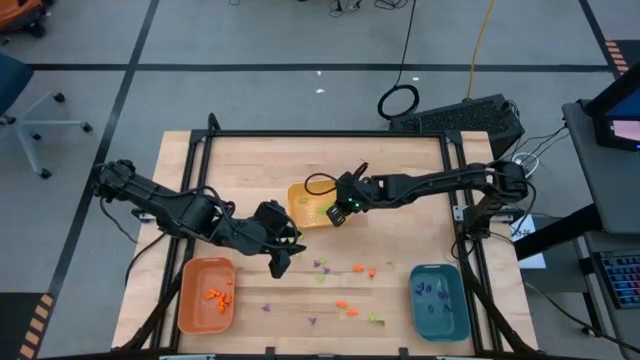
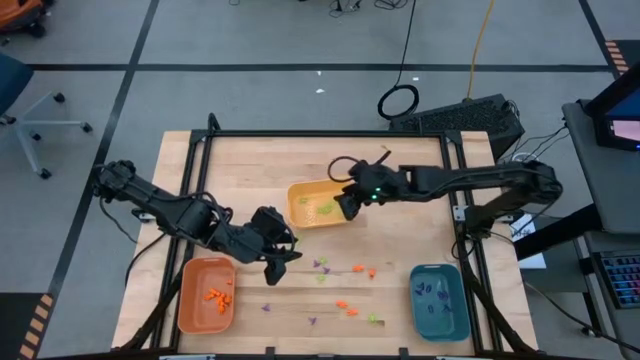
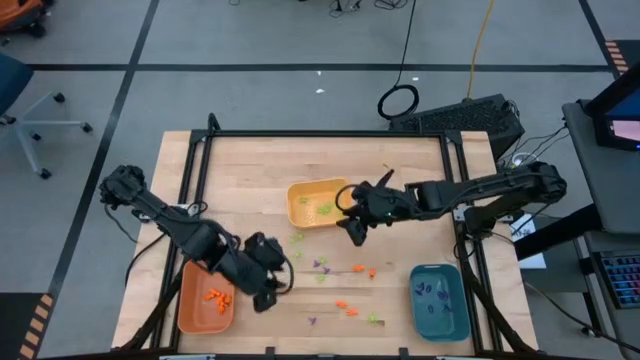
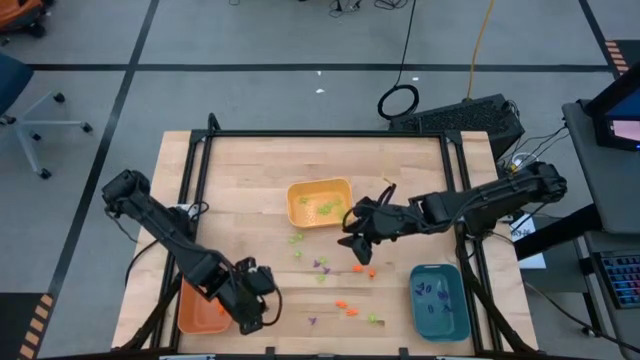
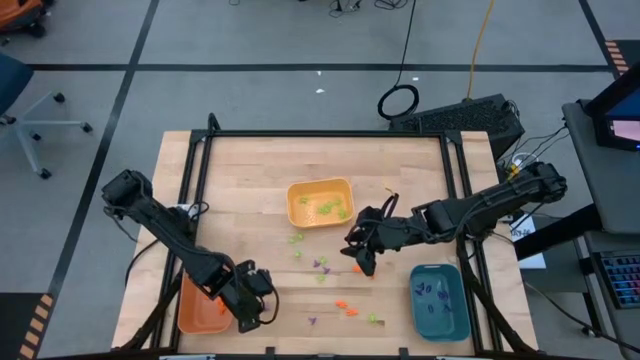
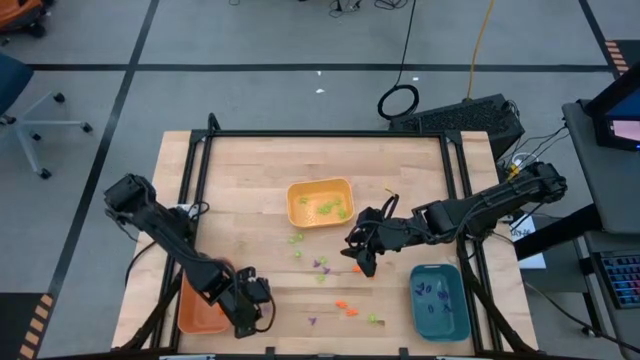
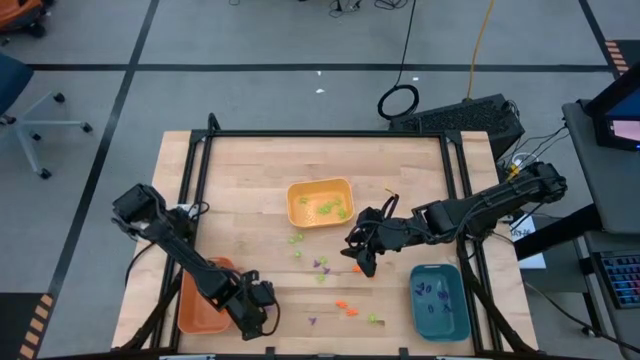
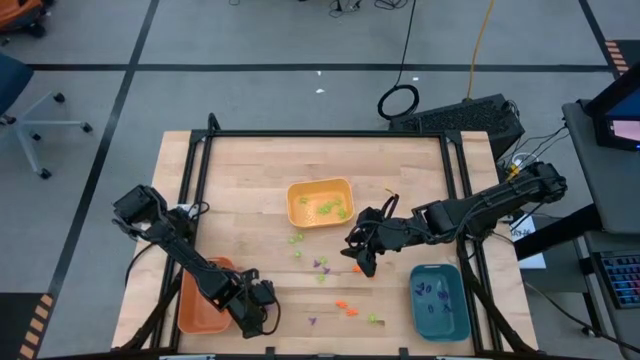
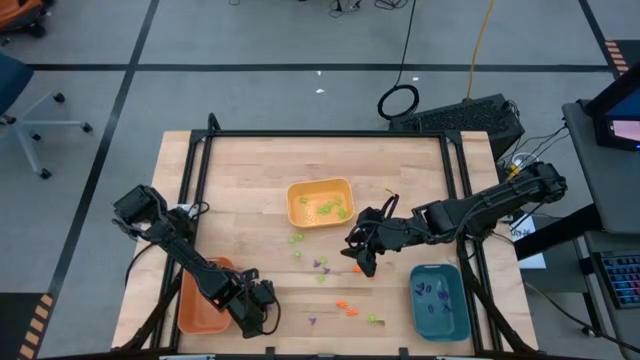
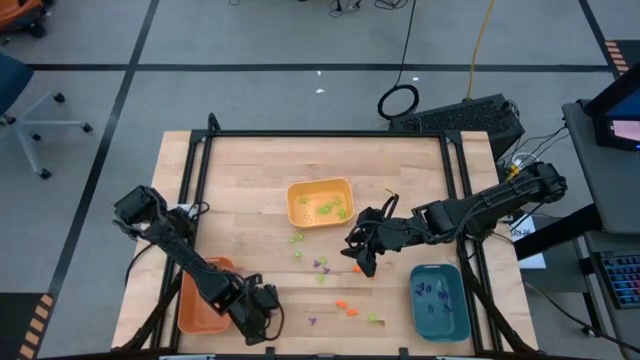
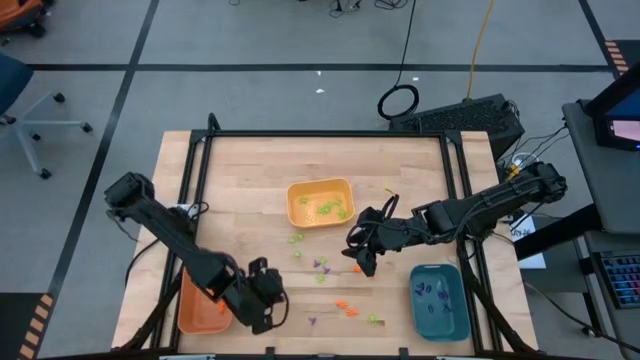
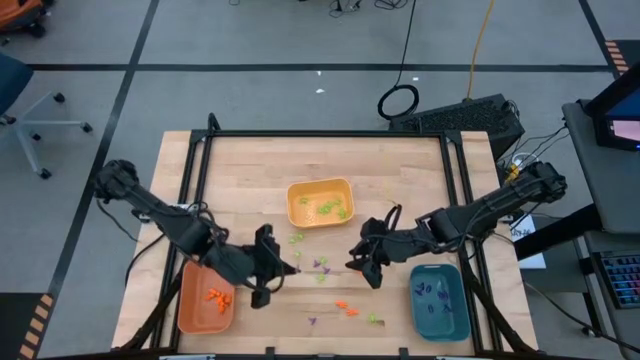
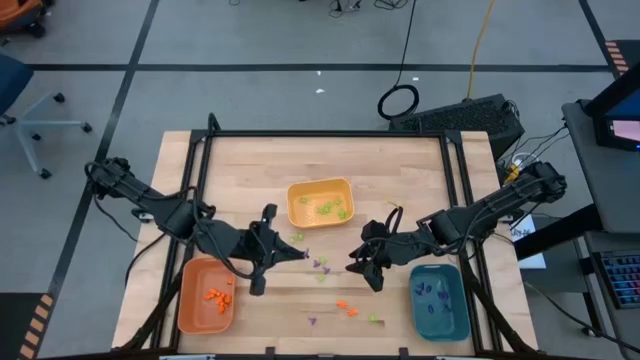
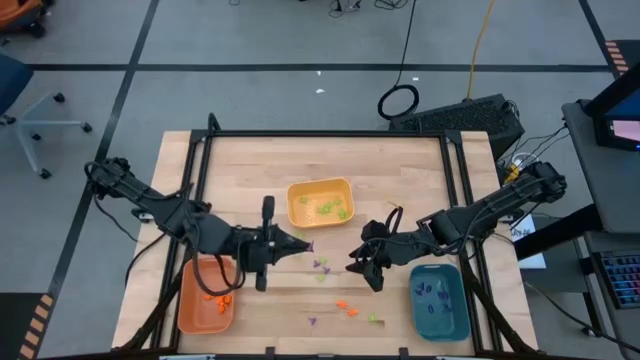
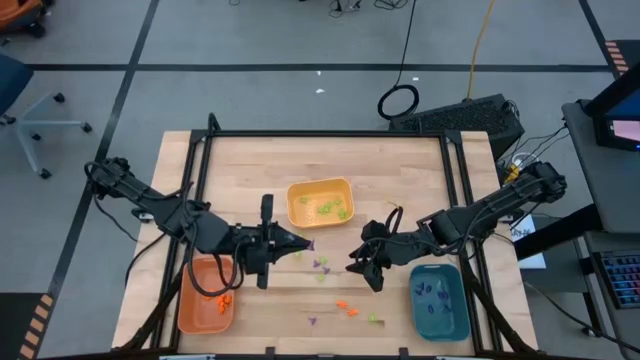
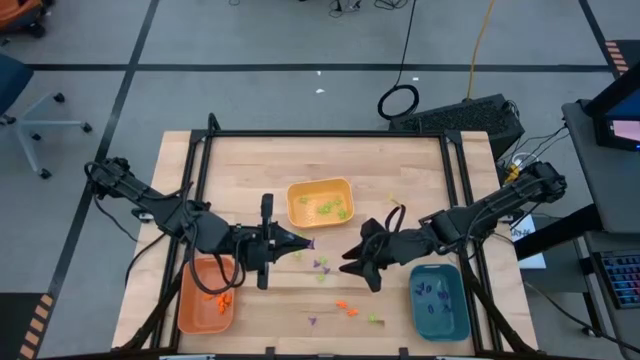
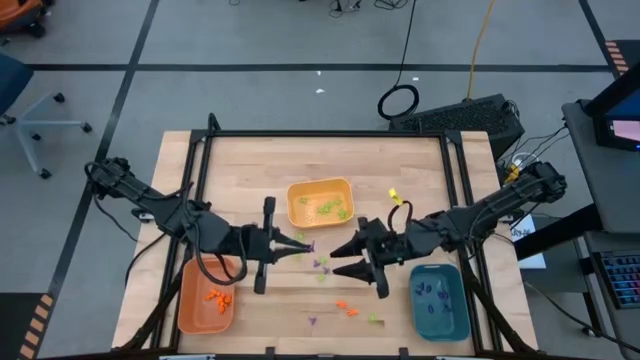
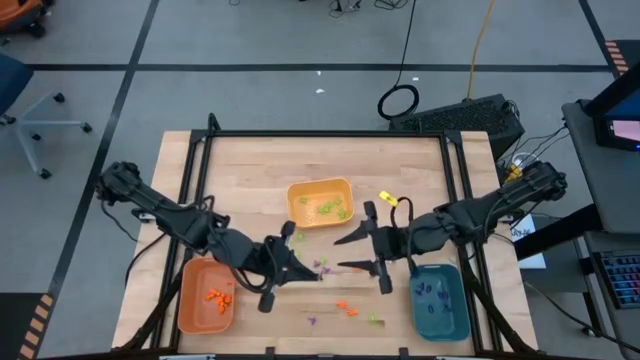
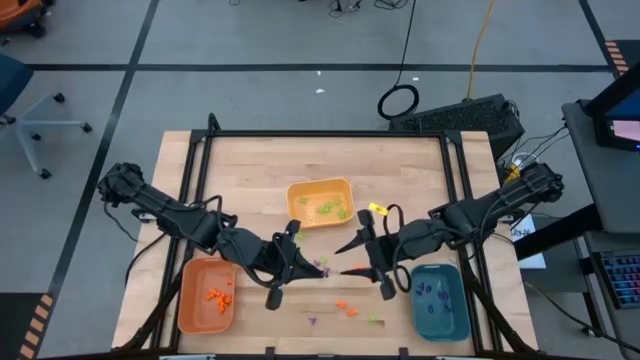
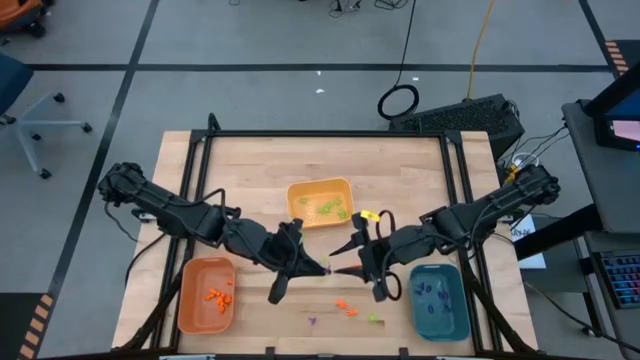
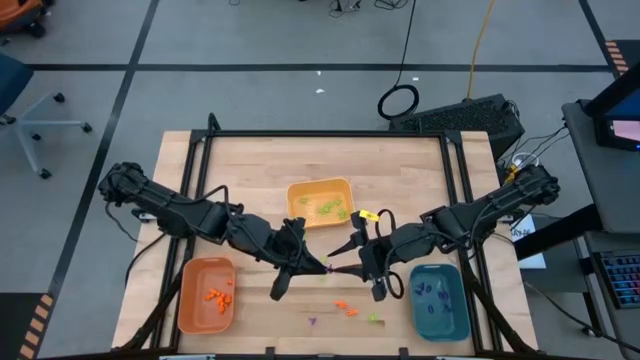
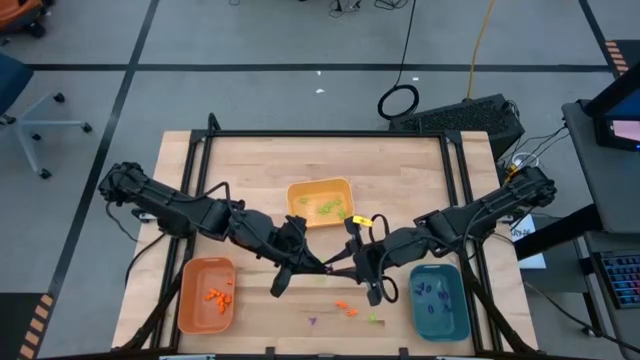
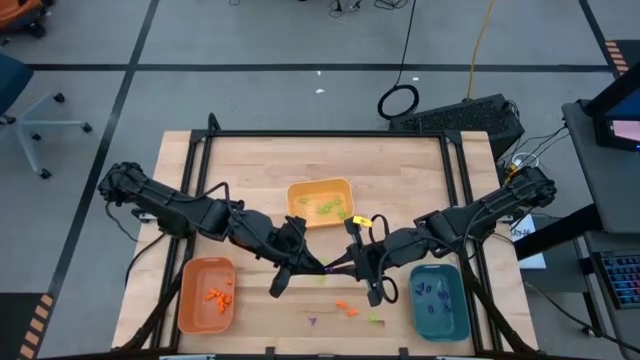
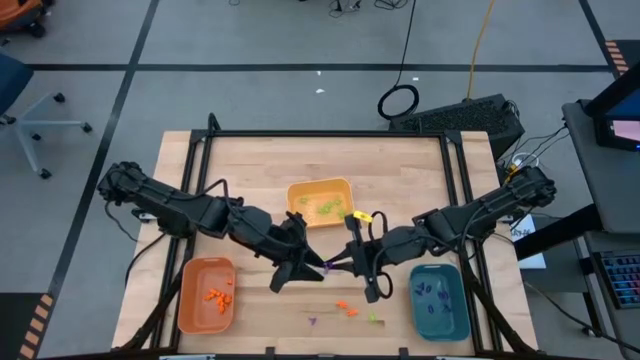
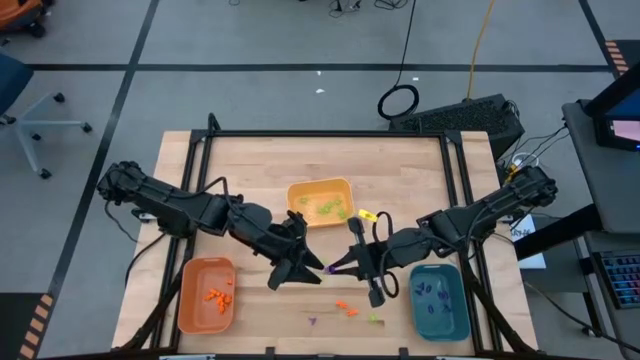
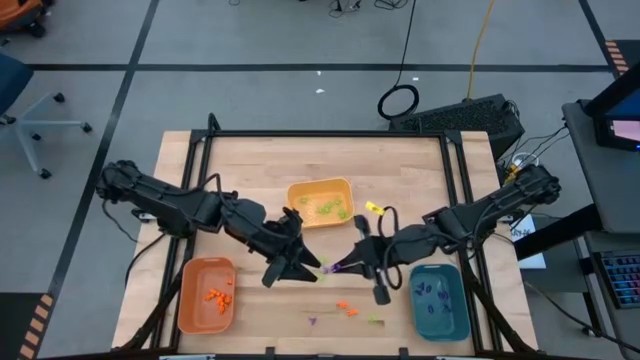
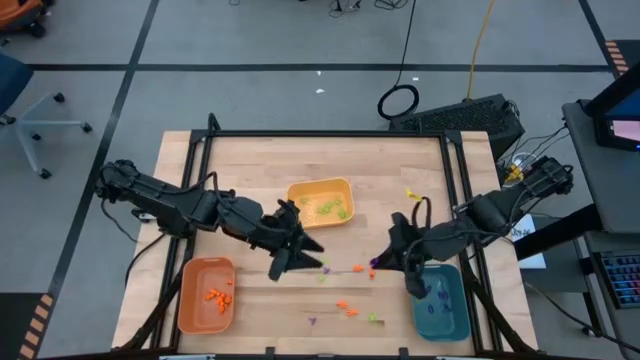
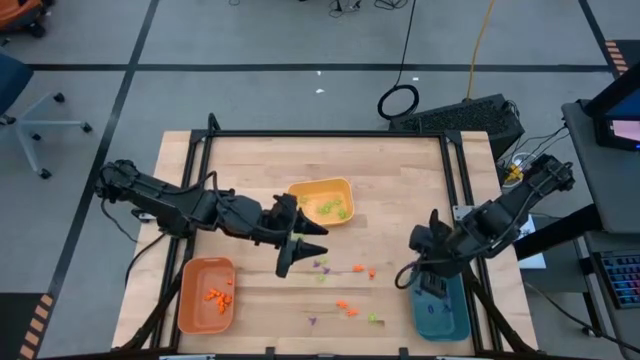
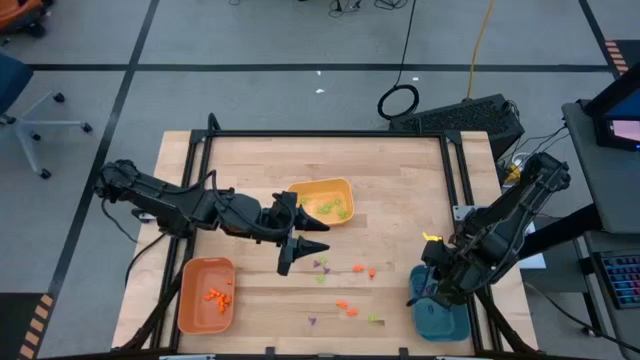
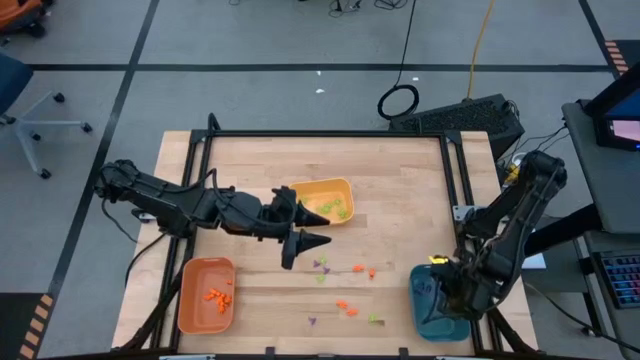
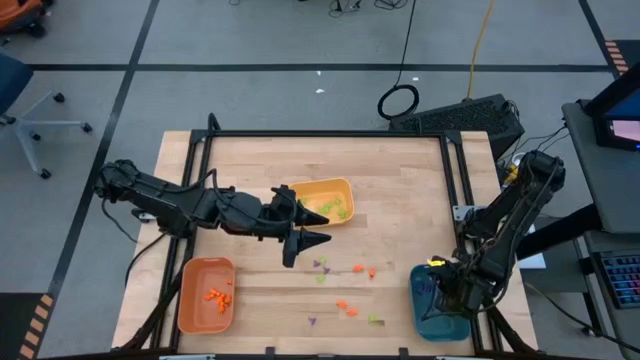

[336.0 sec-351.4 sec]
Task: Sort Halloween decoration
Put the violet witch hat toy into the blue bin

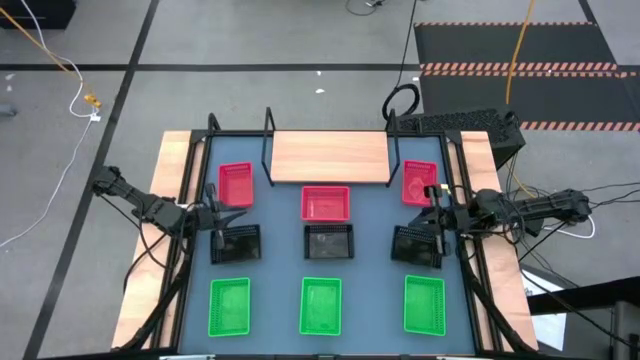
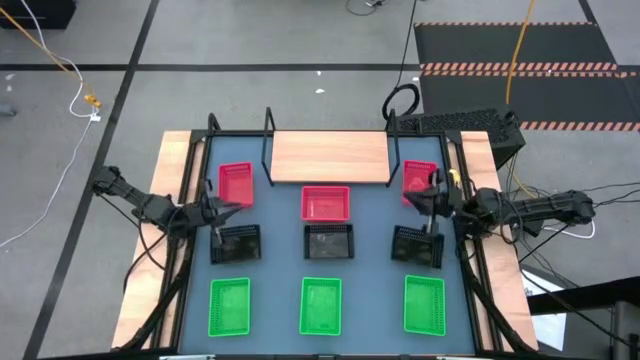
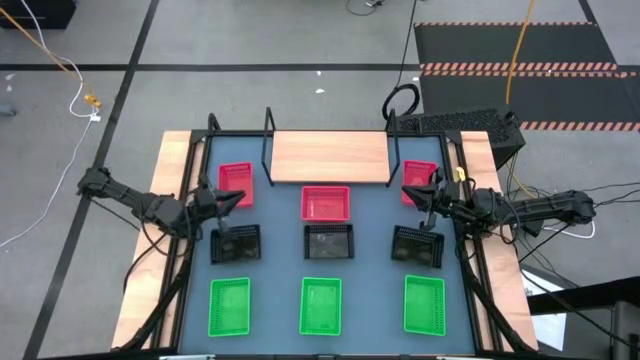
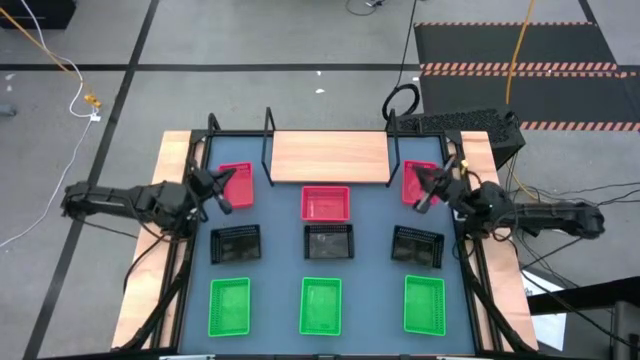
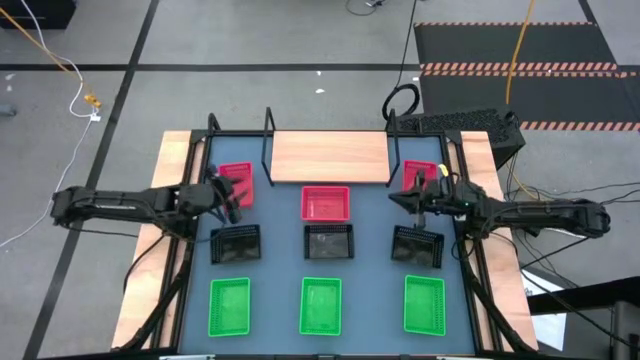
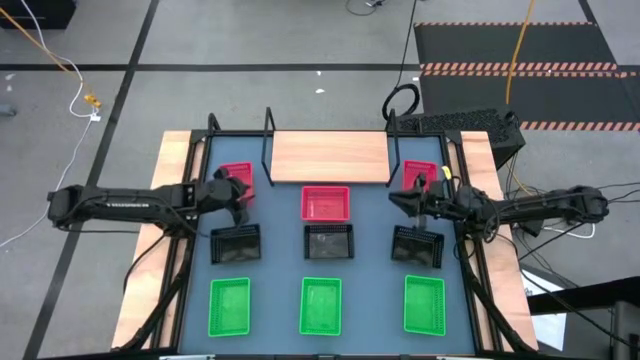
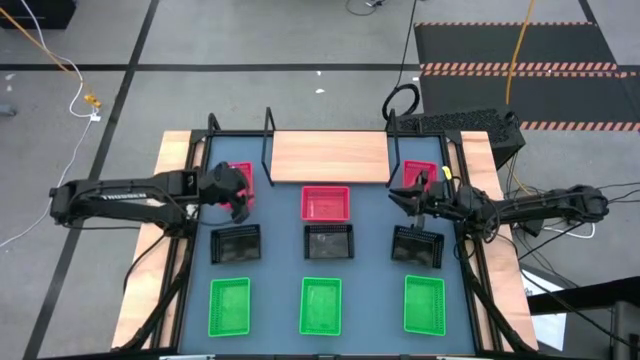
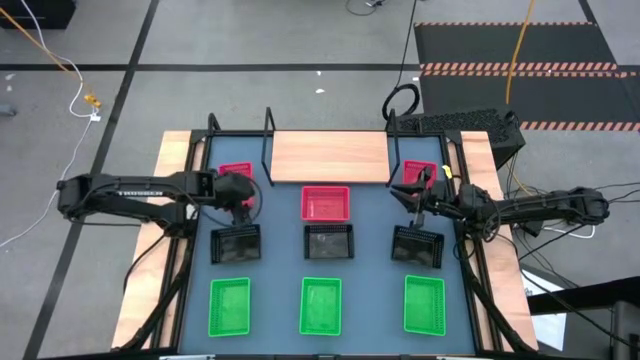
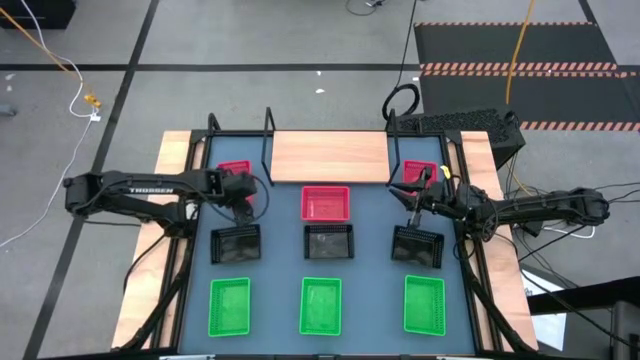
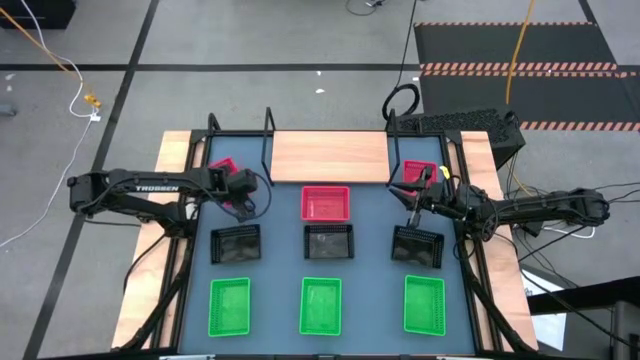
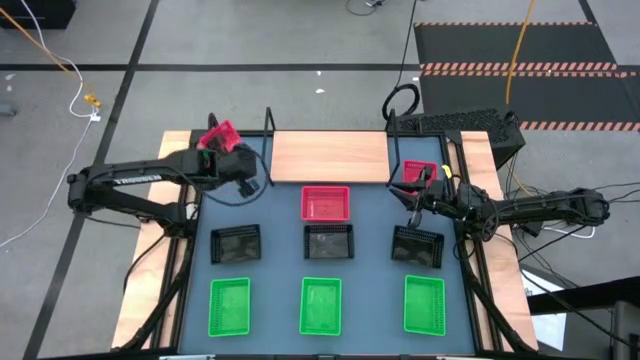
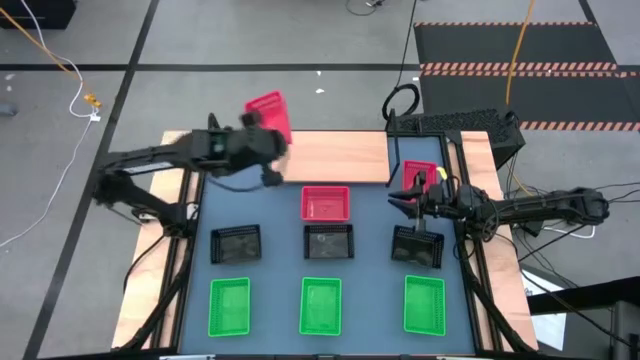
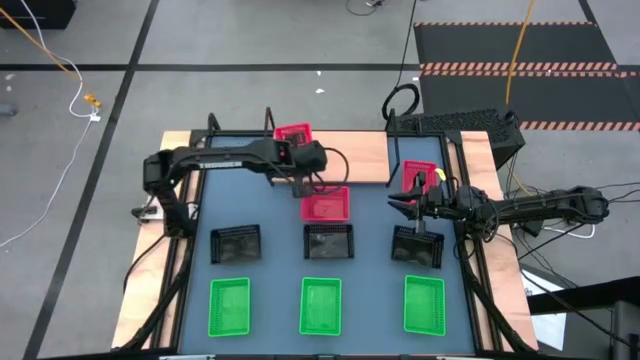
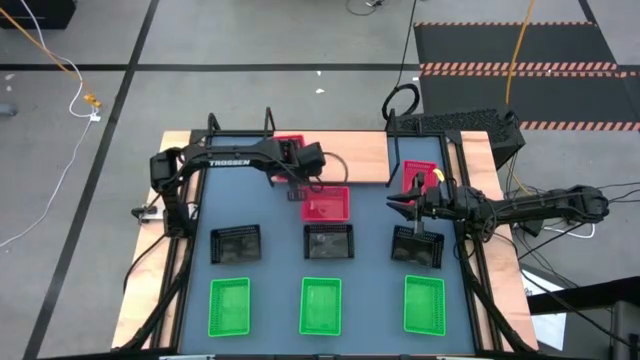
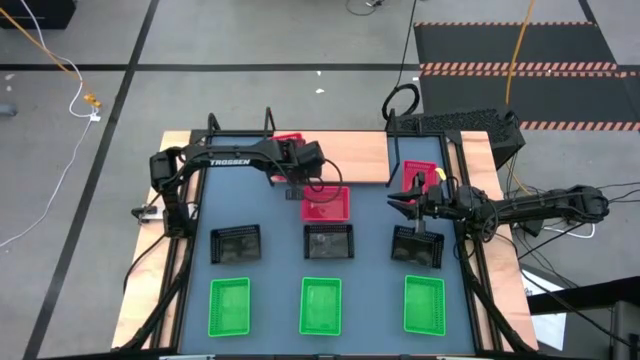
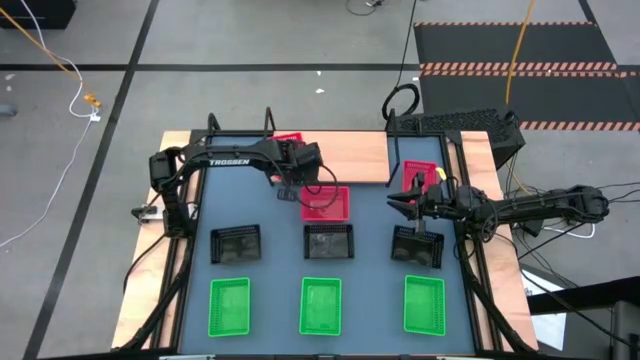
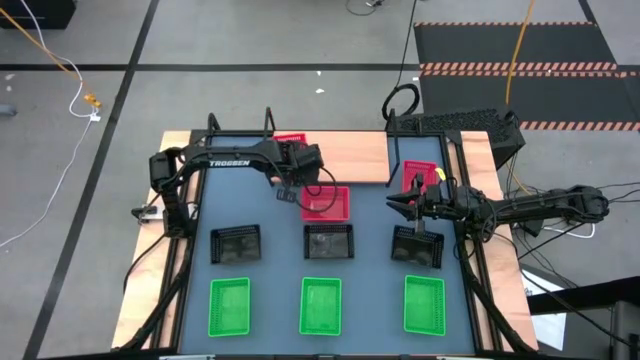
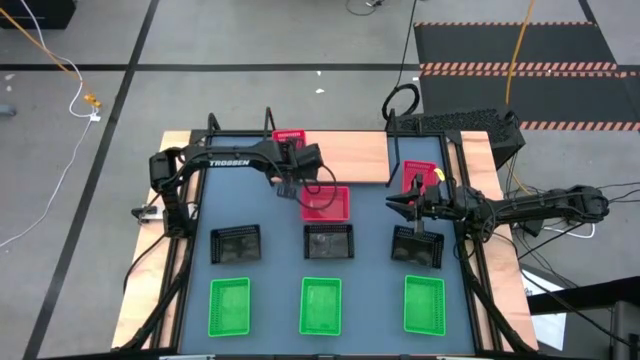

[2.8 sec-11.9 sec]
Task: Stack baskets on shelf by color
Put the left red basket on the shelf
